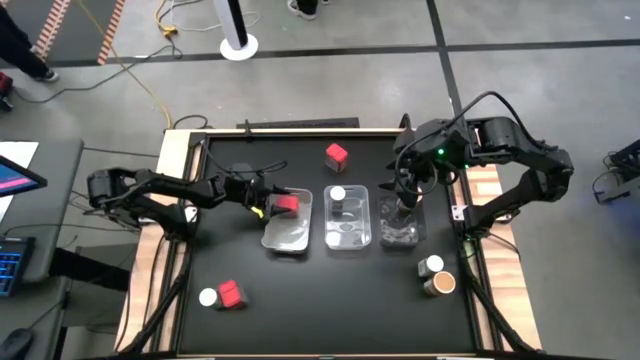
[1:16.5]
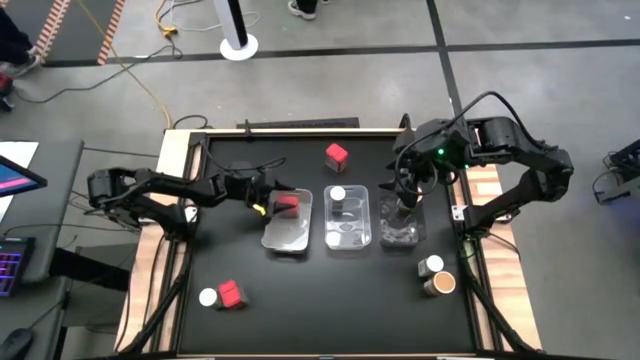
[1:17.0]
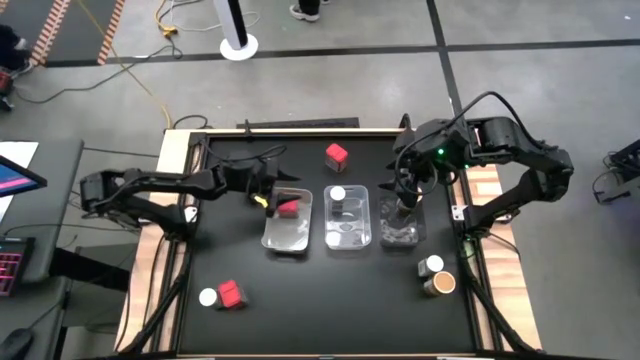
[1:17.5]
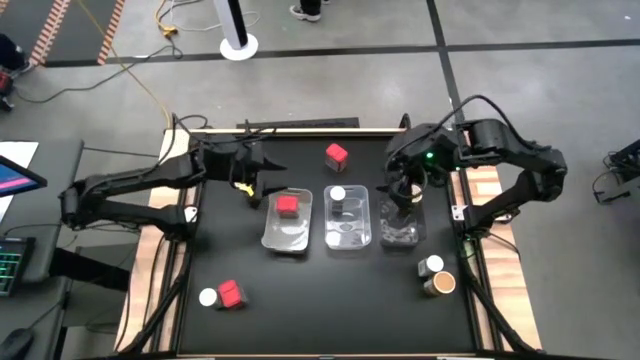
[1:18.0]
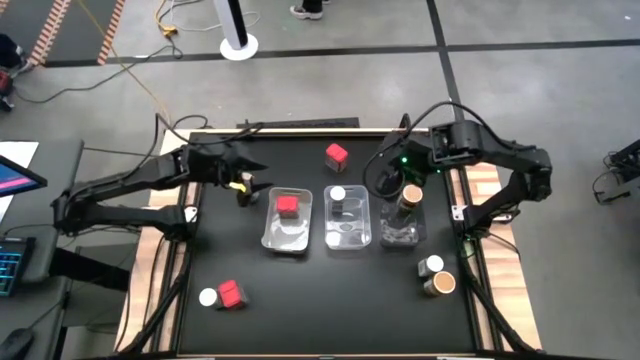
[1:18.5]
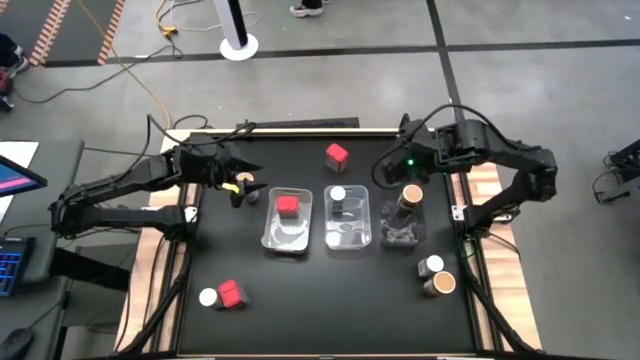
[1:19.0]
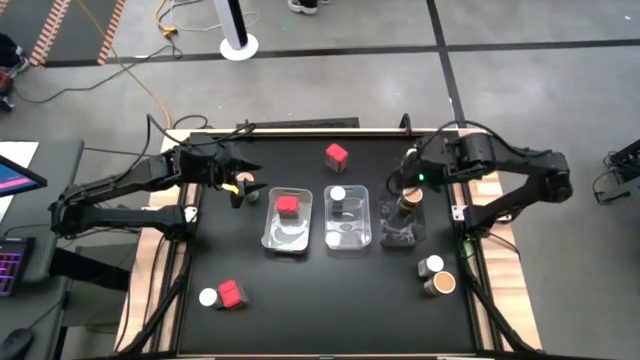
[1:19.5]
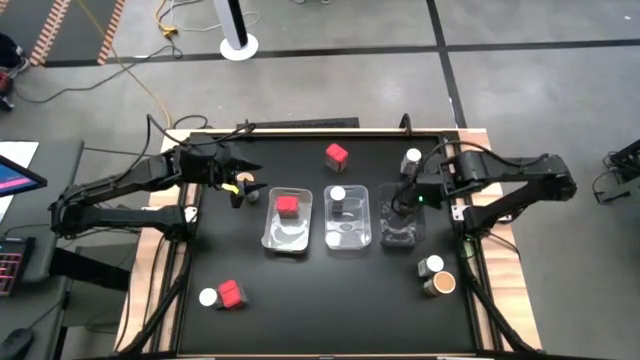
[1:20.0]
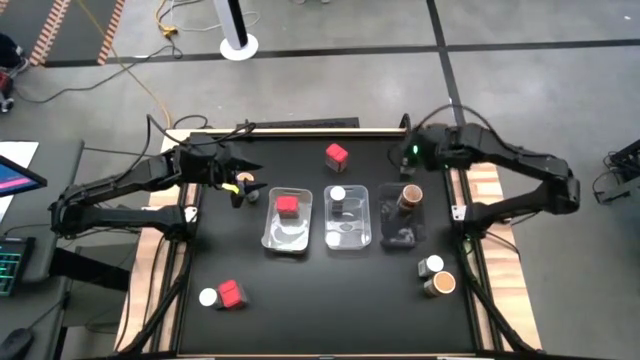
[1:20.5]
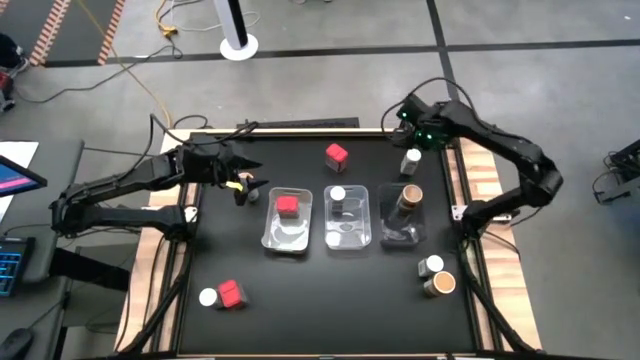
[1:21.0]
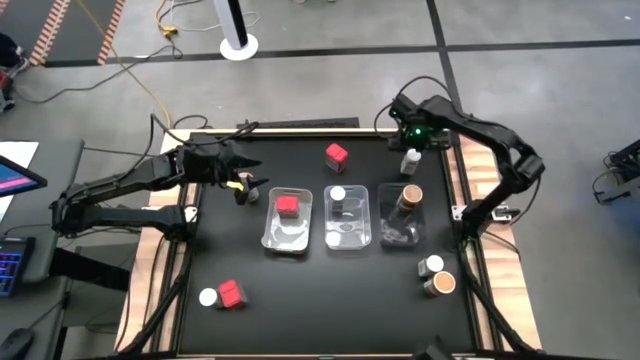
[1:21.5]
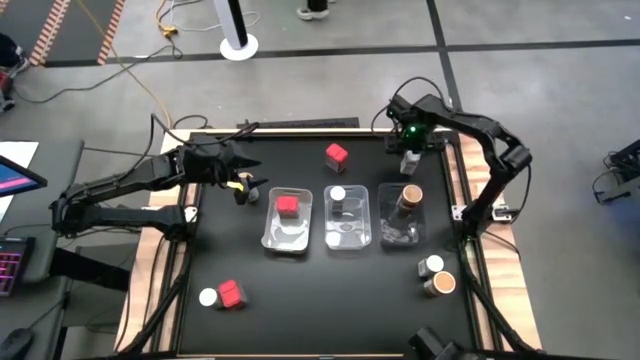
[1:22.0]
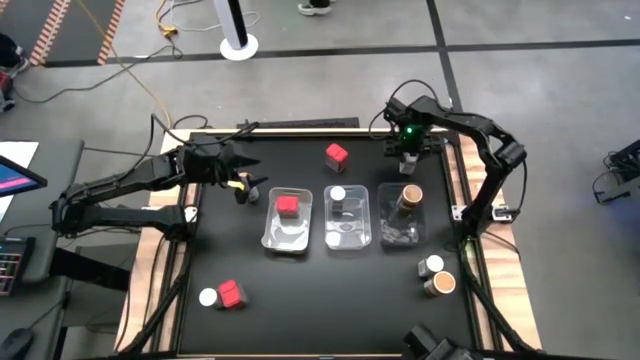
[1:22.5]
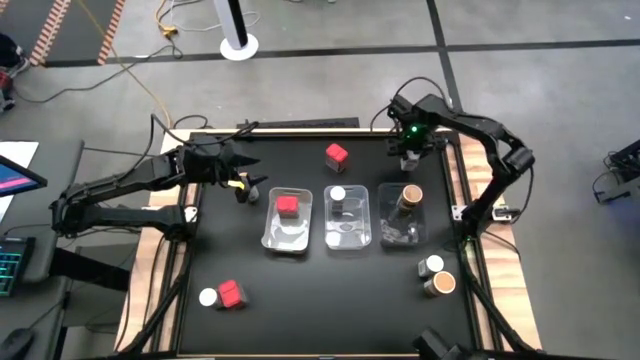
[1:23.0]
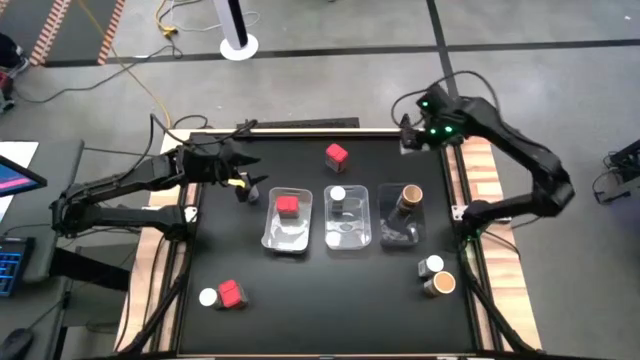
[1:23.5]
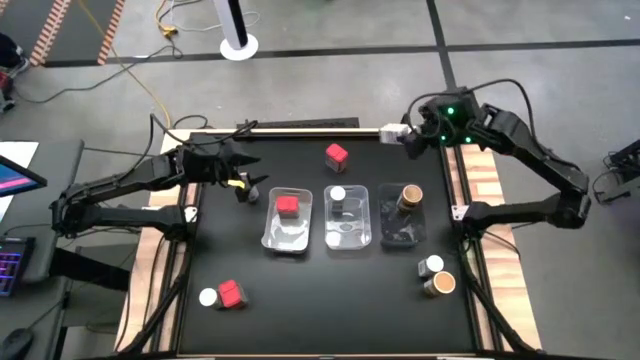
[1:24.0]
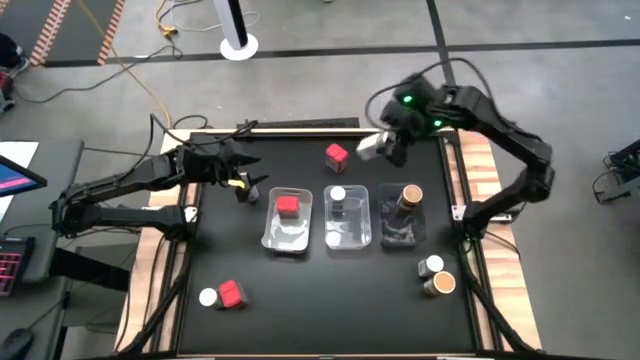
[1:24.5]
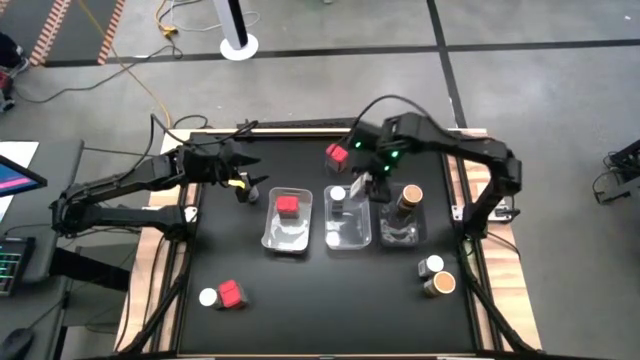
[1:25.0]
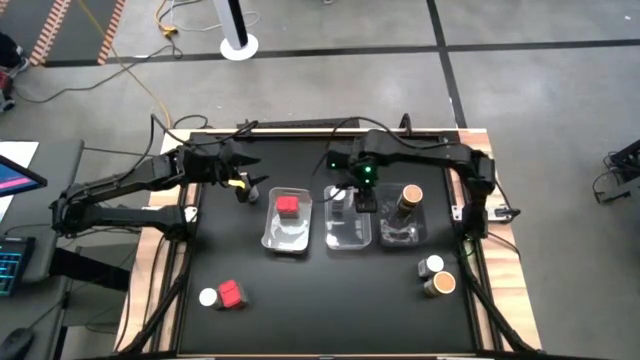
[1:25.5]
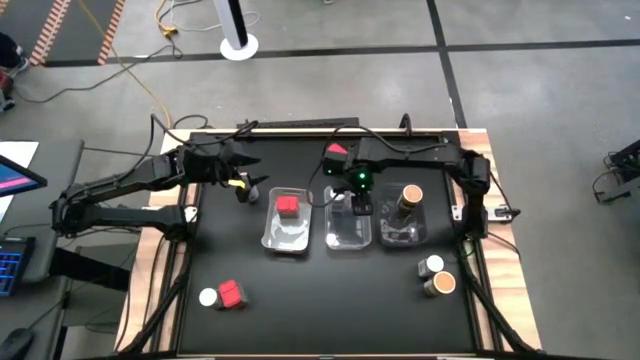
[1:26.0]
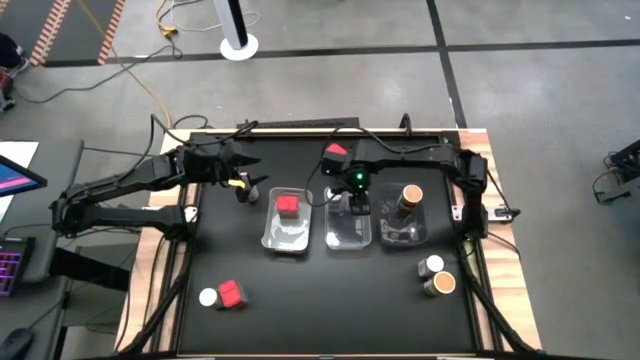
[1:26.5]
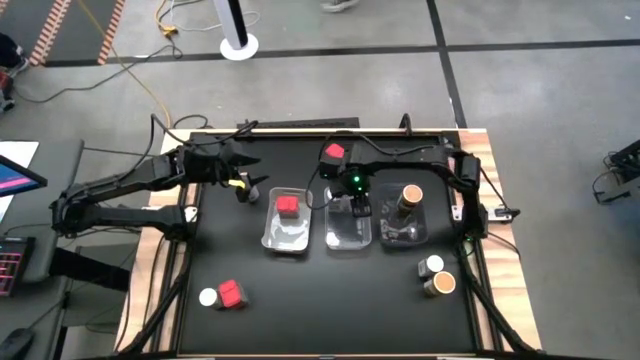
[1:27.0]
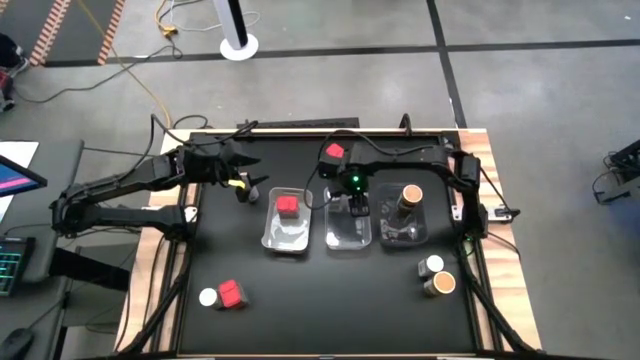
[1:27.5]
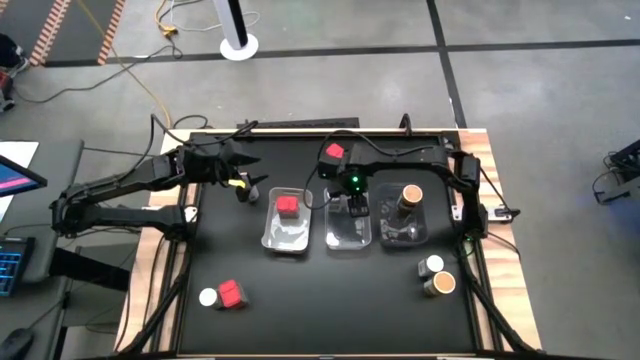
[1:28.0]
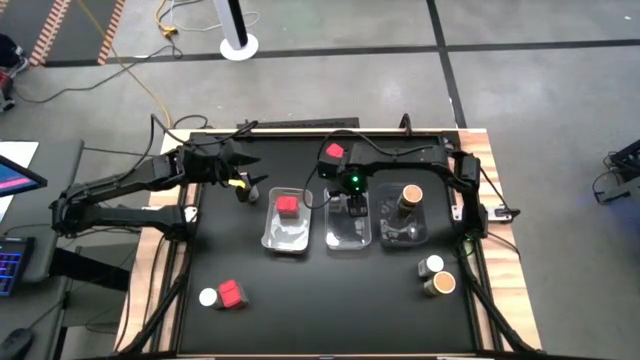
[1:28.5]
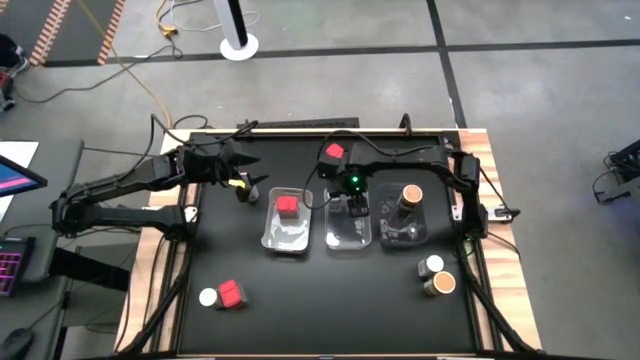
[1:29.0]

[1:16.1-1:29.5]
Task: Sort spices by type
Put the top right white seasoning bottle into the transparent bin

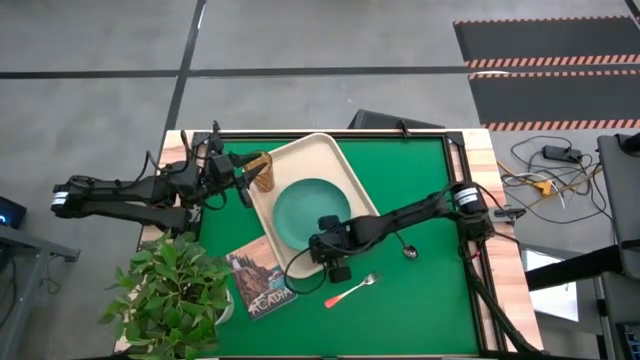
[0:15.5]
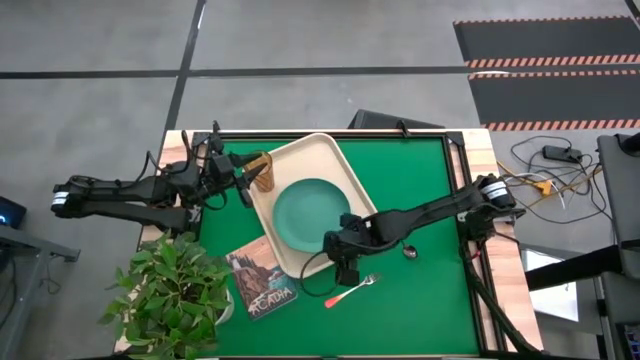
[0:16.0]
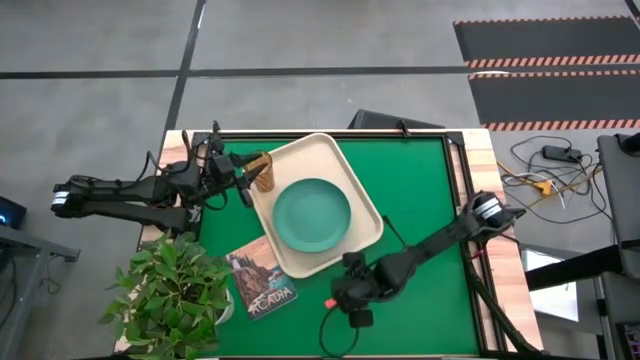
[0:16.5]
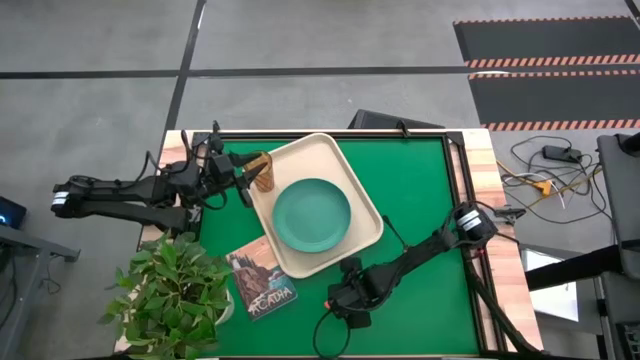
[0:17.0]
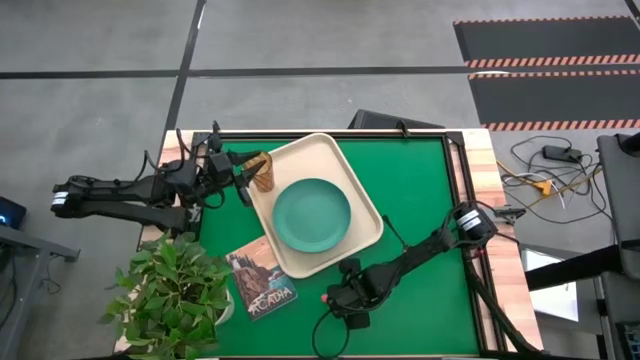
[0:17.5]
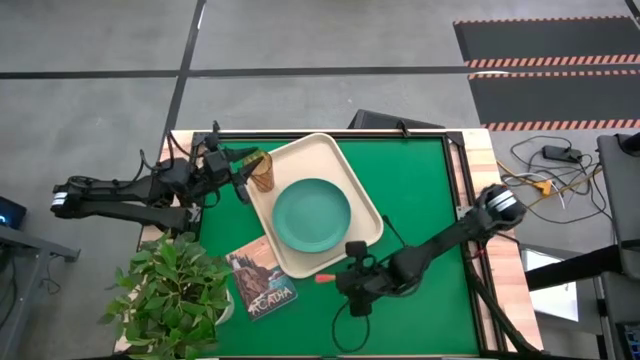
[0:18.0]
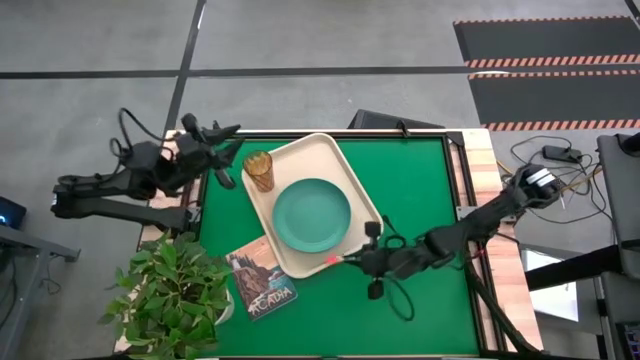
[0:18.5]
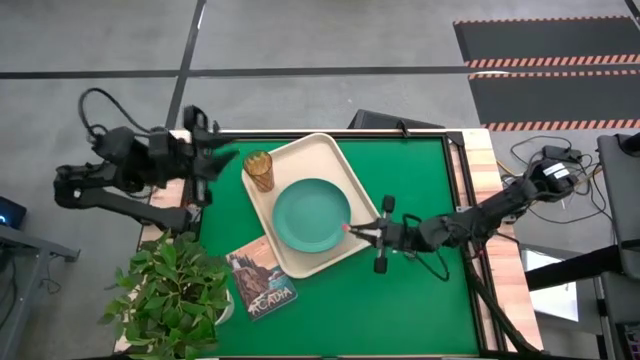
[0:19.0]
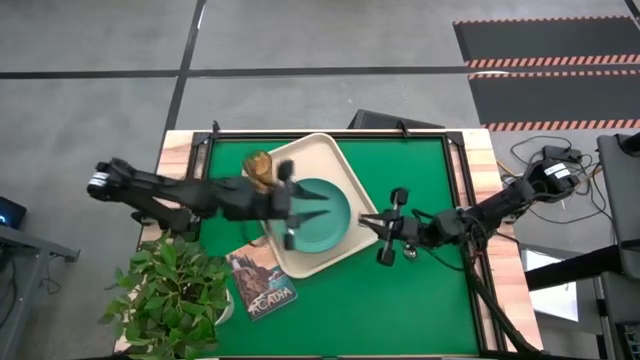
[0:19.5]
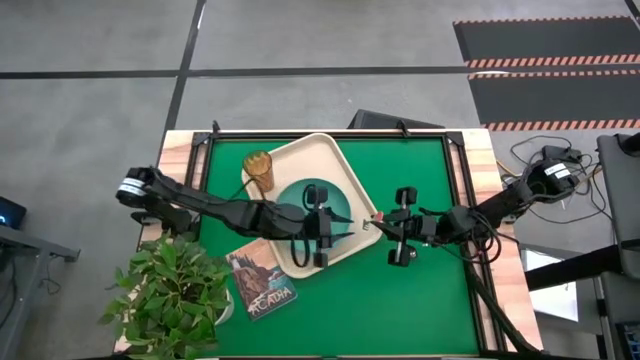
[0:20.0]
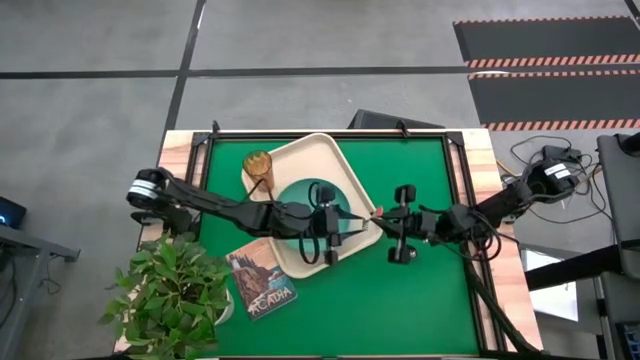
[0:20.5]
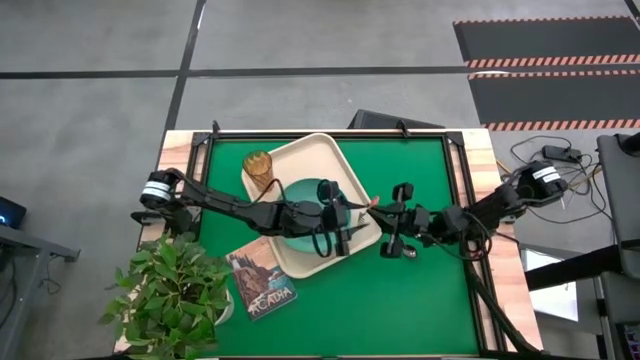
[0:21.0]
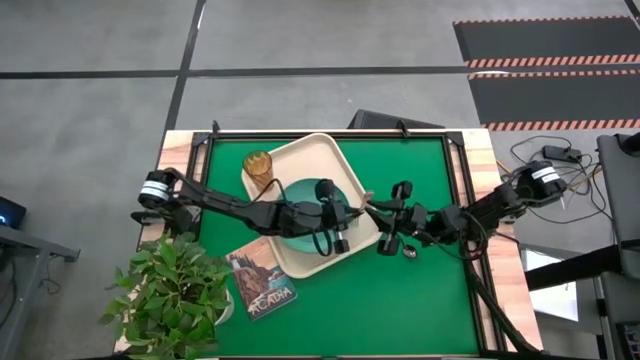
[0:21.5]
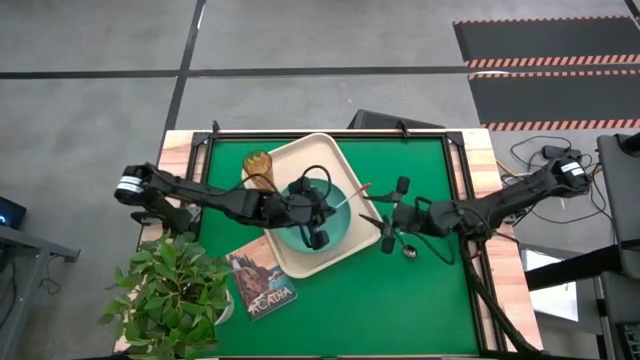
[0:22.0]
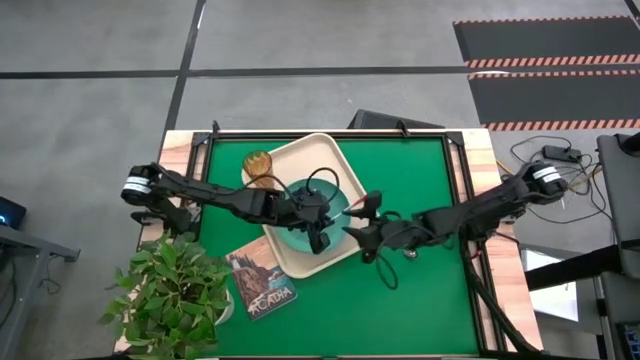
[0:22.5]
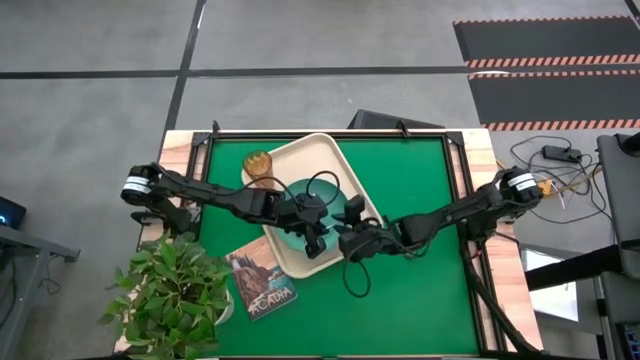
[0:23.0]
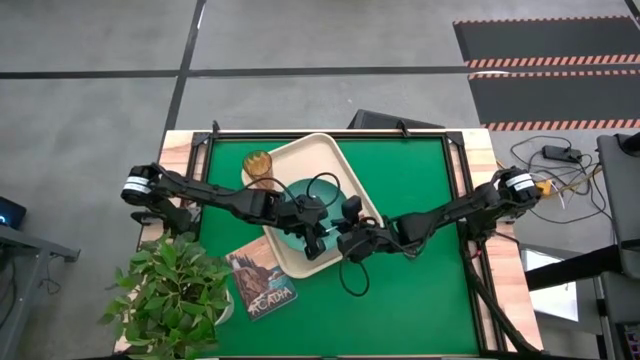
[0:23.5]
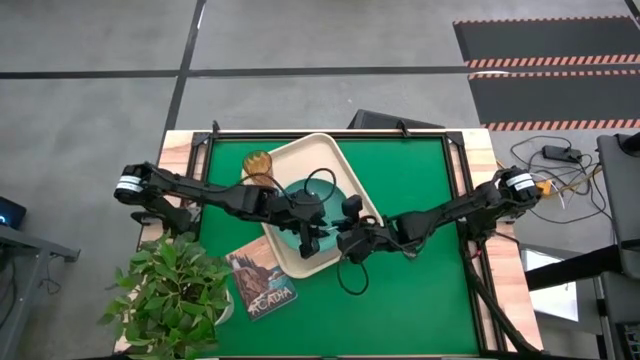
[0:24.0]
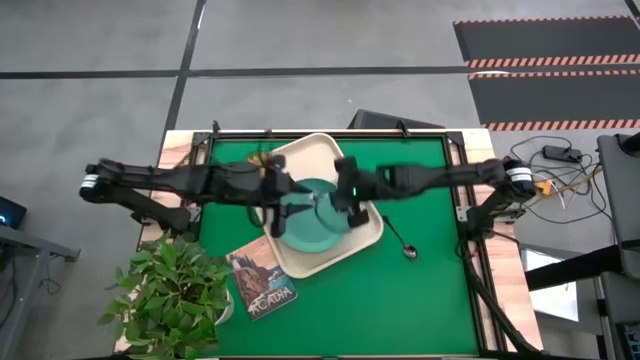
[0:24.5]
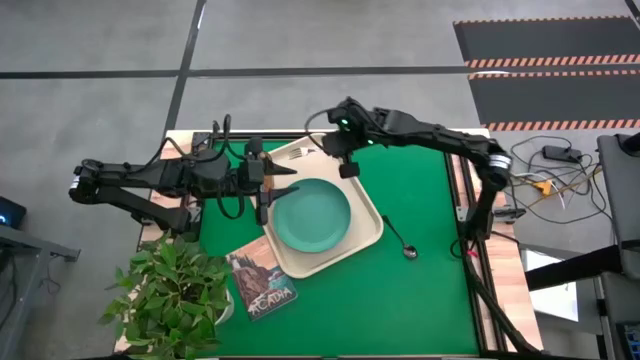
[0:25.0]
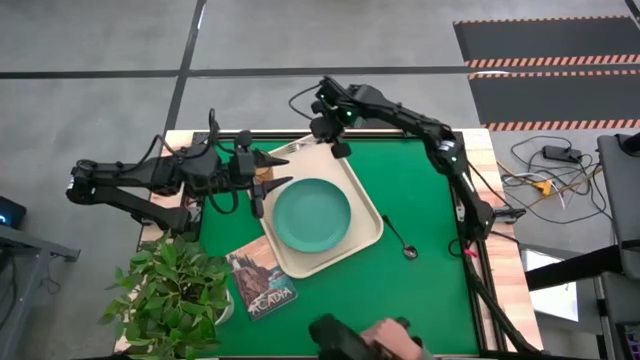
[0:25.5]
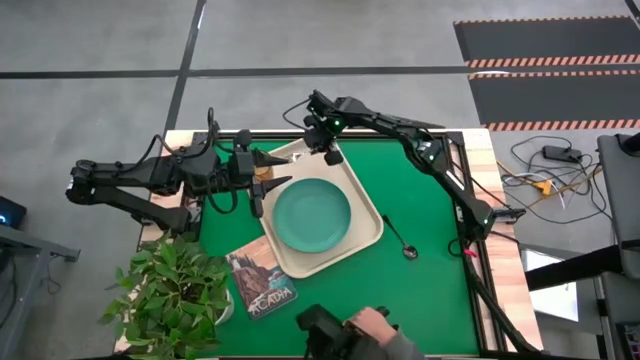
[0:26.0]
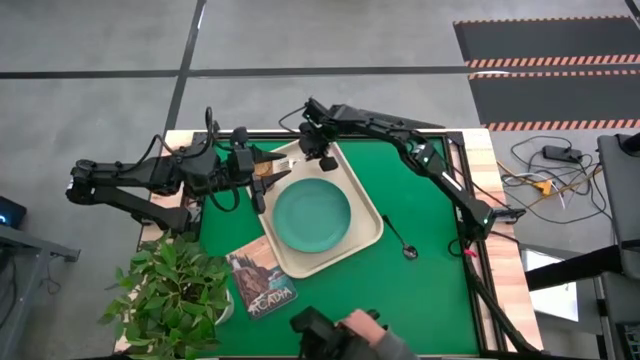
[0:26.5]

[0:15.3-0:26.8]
Task: Pick and place plate/cup/fork/spoon on tray
Put the orange fork on the white serving tray
